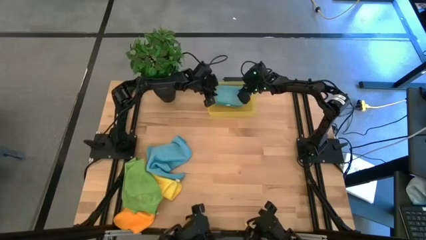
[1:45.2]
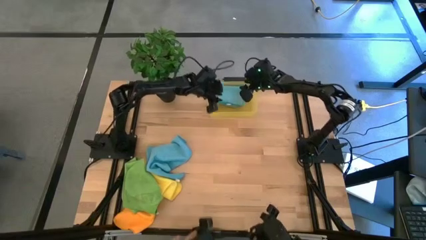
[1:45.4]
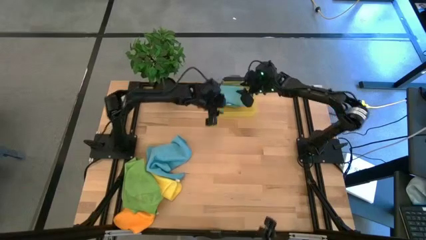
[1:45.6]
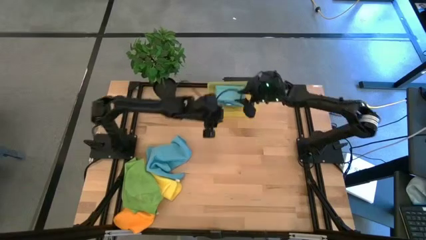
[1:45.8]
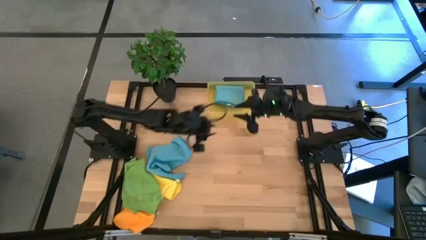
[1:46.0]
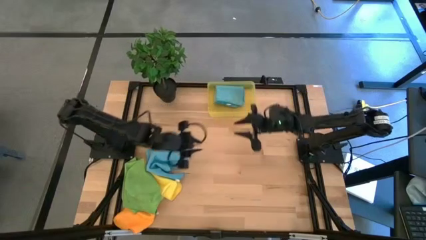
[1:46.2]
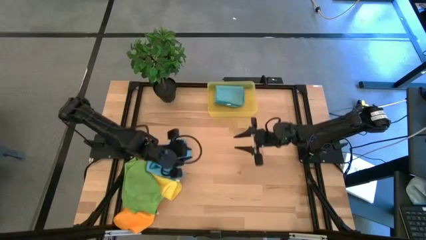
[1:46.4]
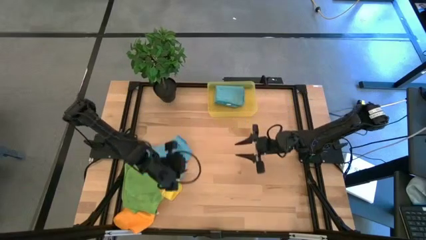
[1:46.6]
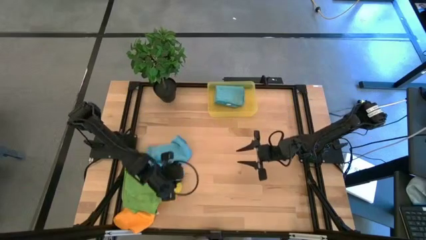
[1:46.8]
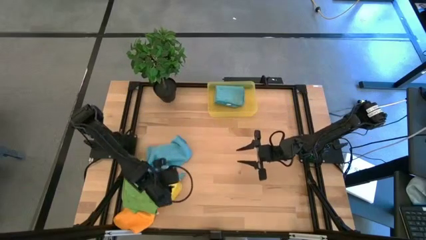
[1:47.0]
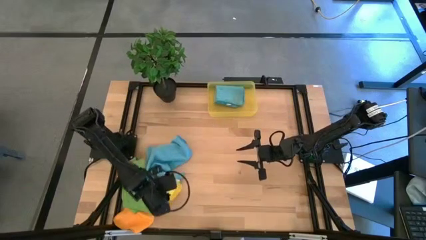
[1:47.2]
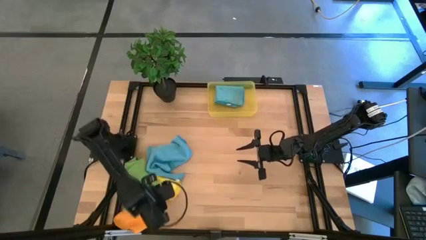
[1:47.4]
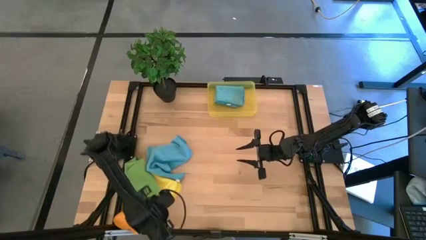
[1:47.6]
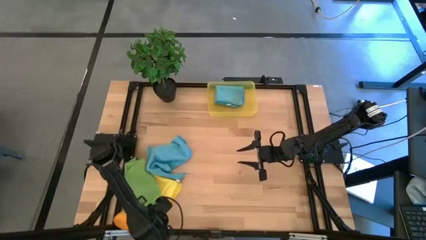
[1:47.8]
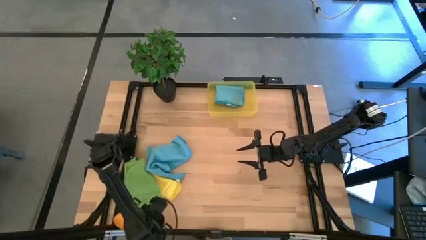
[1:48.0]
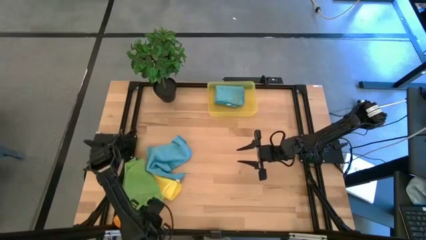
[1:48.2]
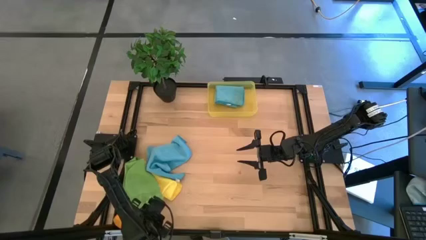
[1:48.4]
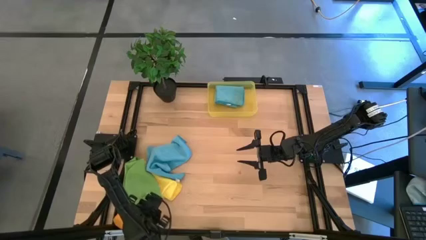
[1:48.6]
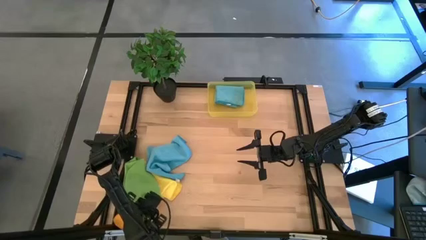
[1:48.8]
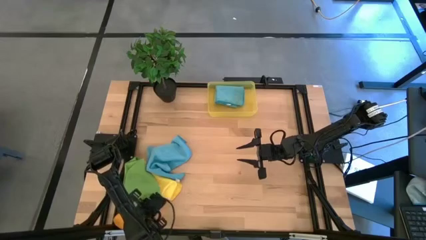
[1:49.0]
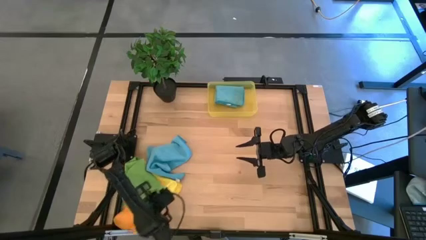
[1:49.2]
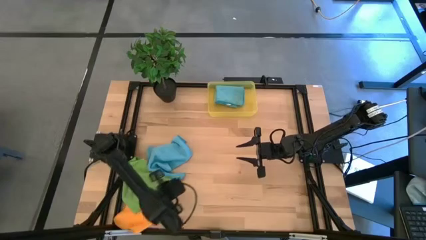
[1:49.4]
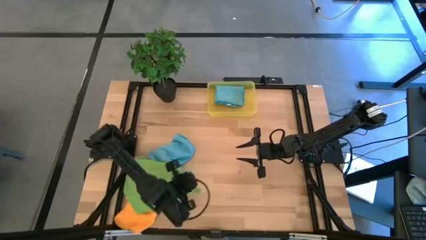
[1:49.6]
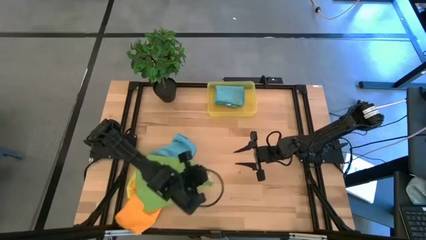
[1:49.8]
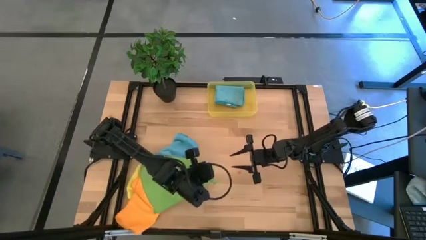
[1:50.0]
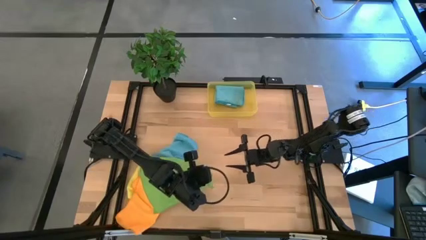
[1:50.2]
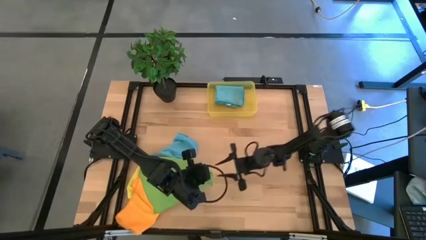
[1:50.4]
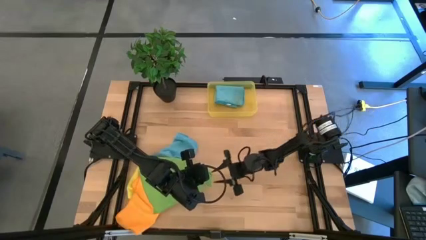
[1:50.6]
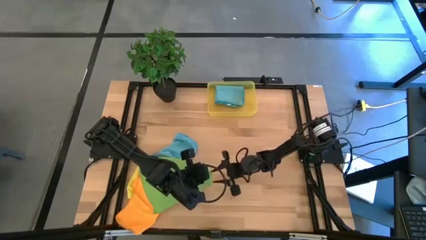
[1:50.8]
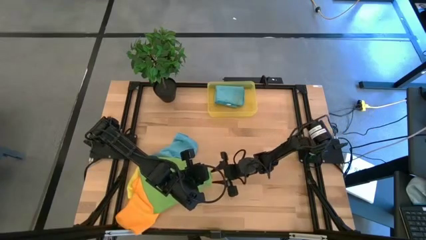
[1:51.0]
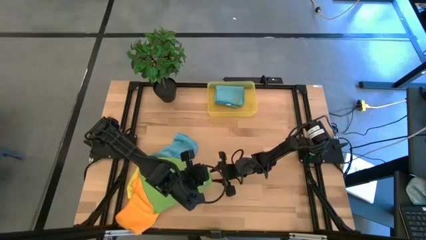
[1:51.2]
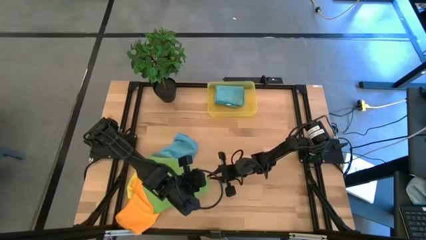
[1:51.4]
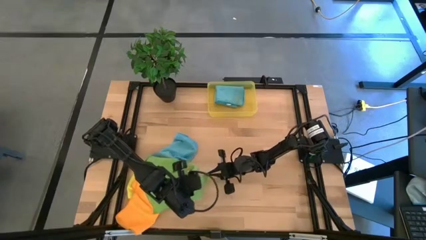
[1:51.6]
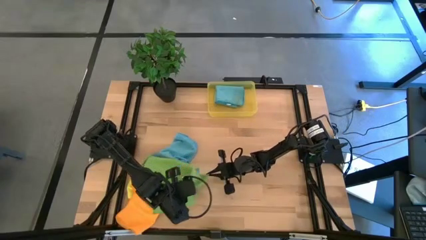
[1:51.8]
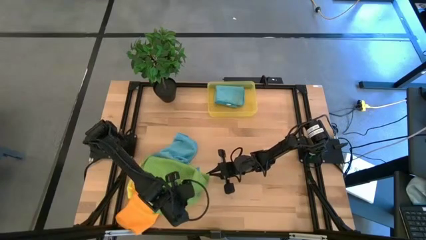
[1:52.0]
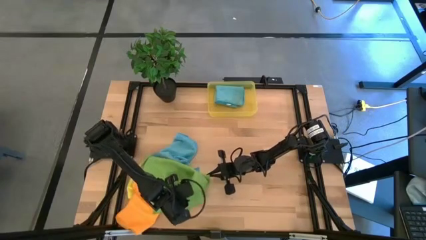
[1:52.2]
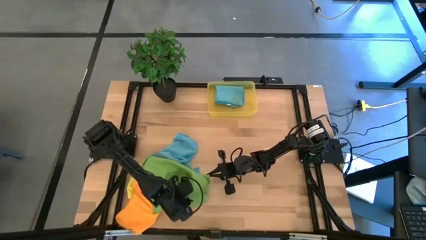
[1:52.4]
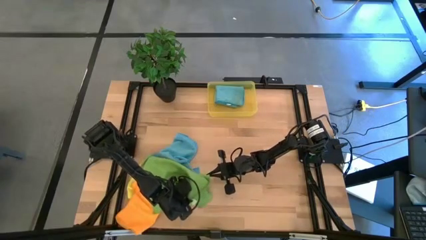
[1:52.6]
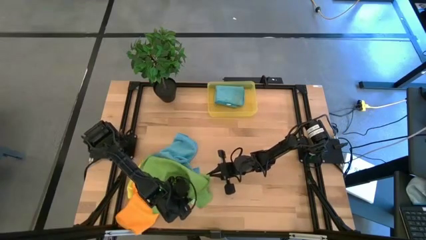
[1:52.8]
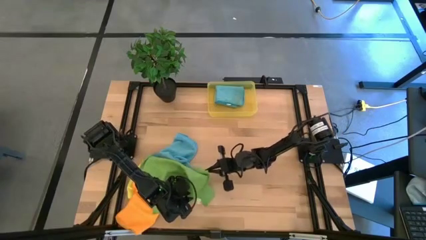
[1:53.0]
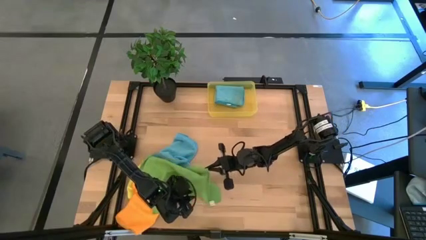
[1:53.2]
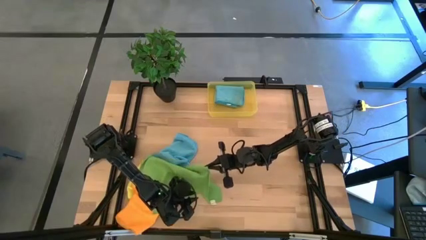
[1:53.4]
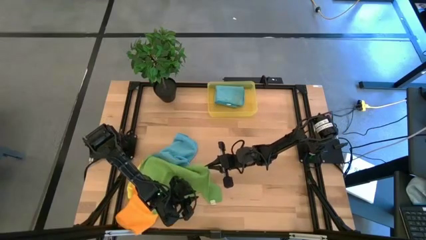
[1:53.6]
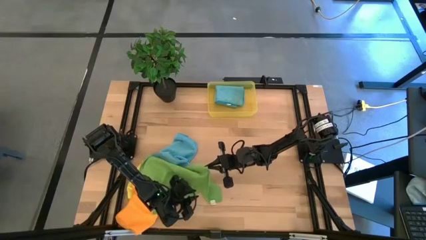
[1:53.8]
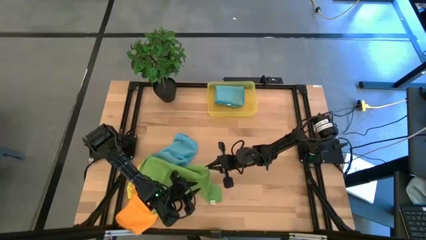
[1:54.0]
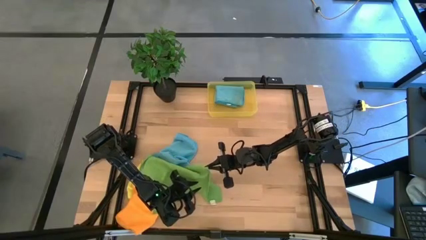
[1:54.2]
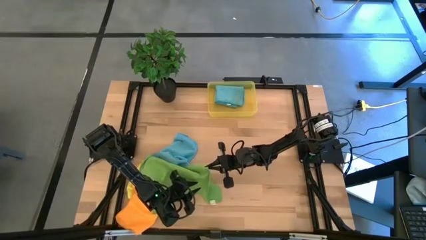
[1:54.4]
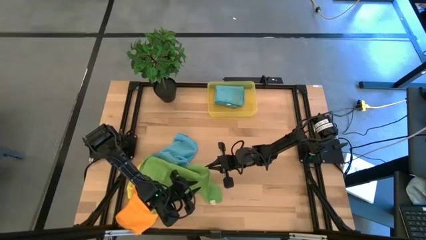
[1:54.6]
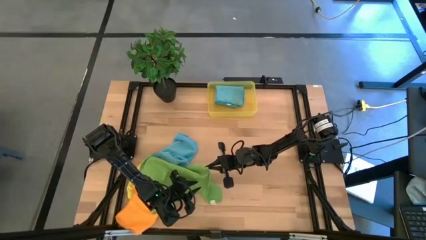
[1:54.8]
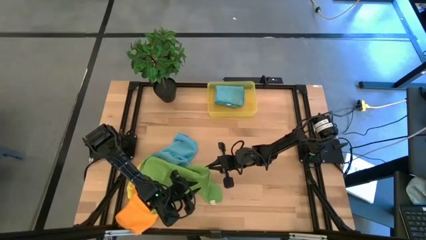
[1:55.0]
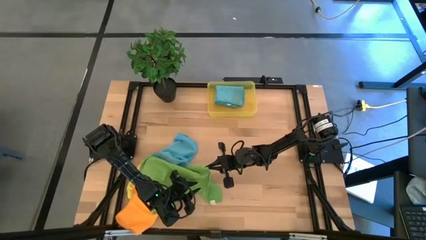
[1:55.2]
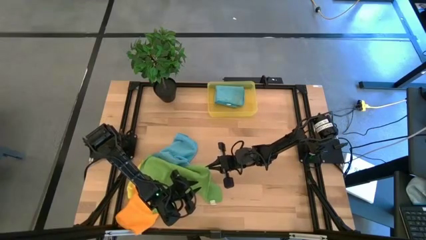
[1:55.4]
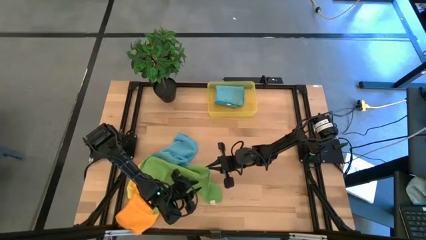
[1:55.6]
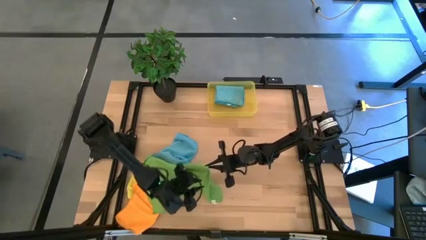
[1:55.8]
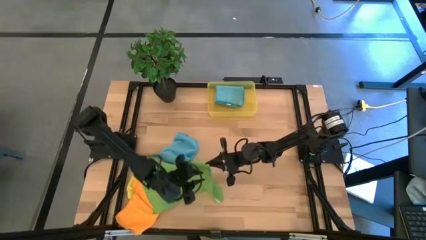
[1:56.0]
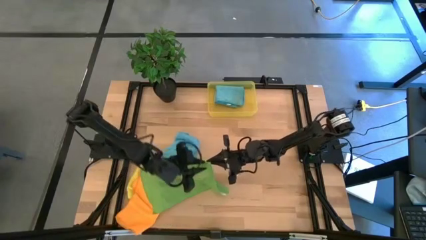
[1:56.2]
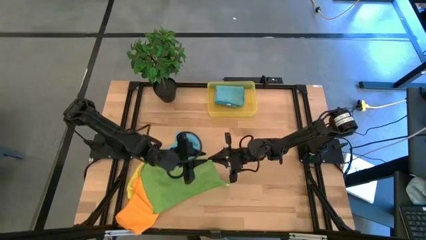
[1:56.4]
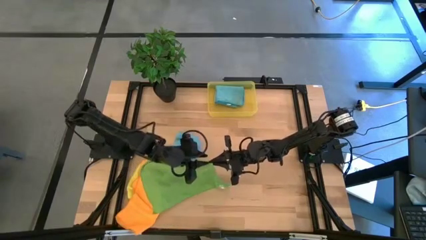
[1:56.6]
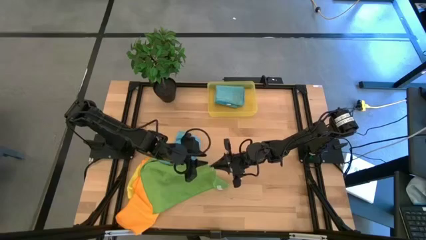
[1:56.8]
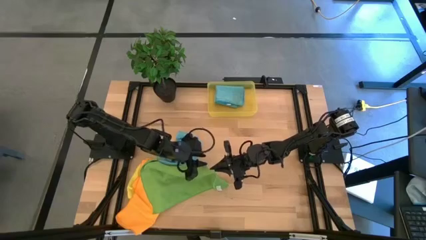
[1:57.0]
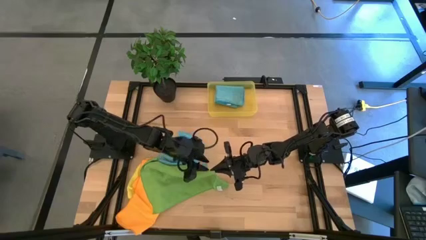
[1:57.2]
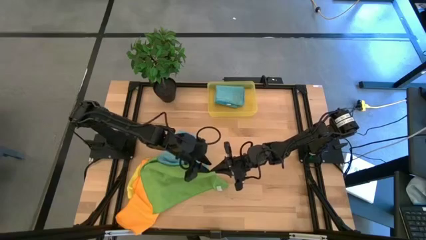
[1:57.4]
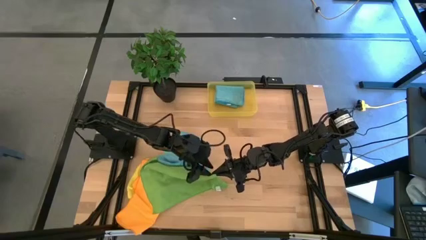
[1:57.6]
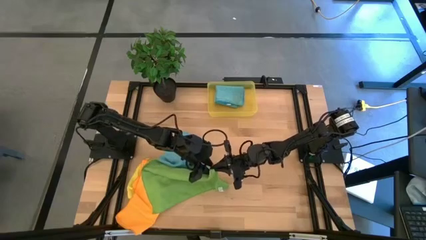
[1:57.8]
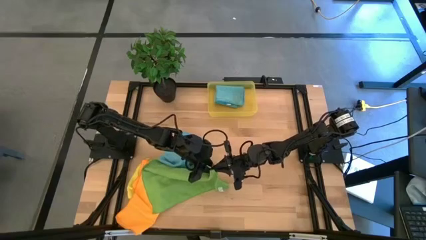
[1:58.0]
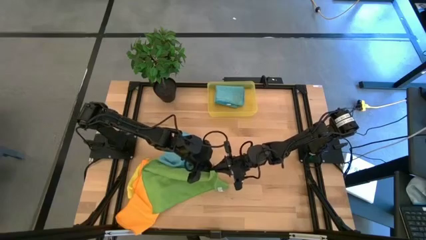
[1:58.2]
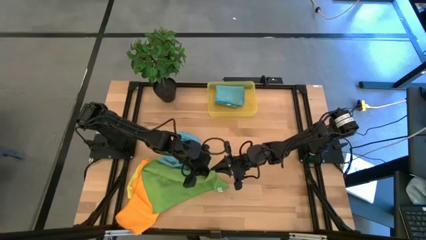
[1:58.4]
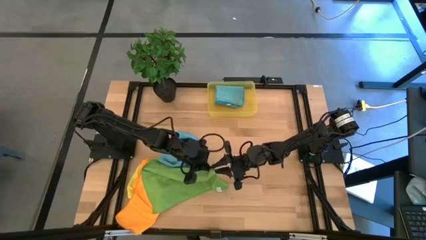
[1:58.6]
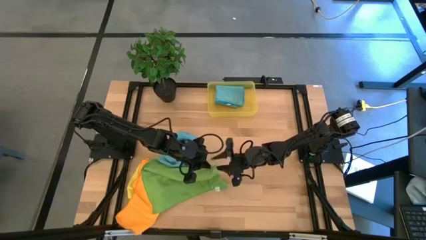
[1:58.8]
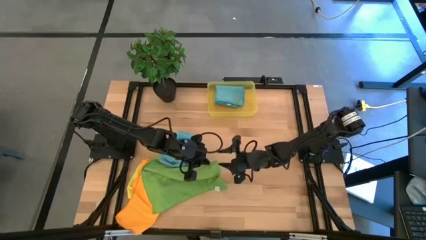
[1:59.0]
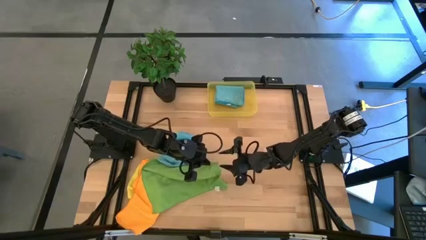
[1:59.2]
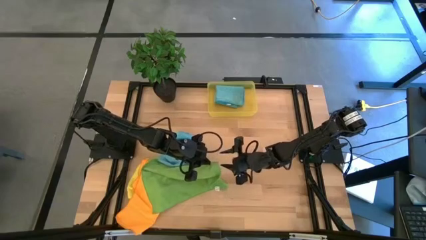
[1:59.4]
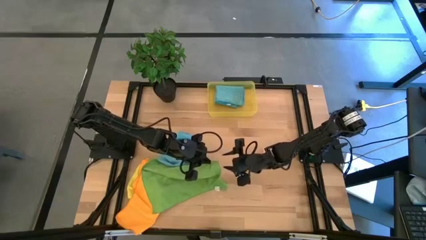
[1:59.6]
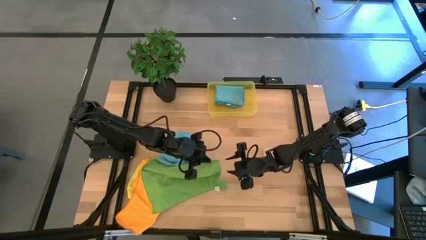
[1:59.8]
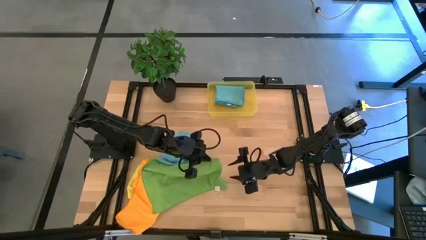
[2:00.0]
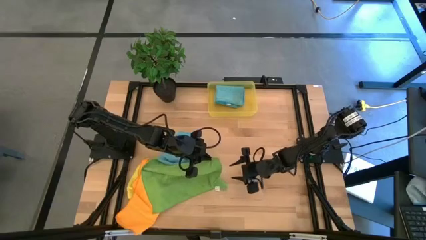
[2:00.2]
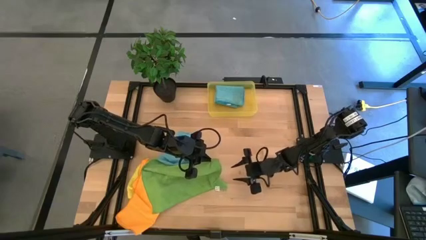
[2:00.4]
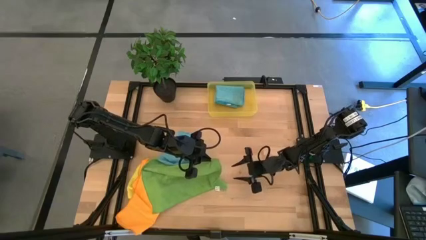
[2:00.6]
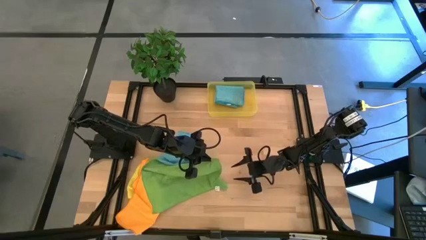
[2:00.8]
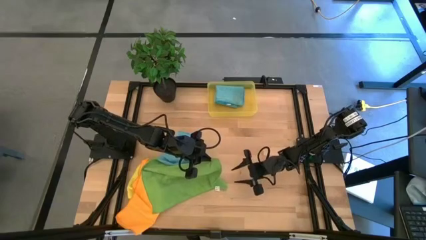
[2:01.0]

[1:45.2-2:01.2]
Task: Fold microfiber towels
Fold the green microfiber towel
